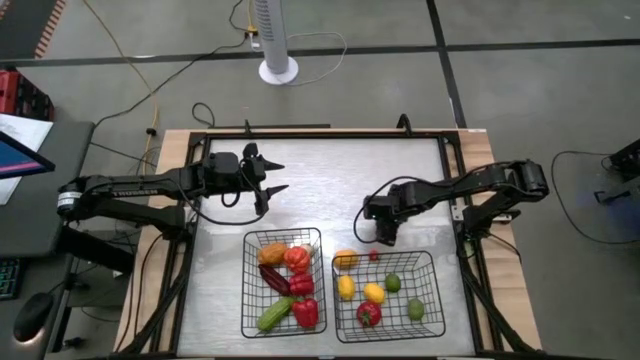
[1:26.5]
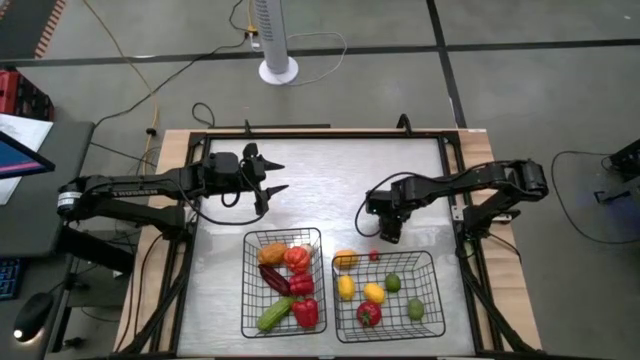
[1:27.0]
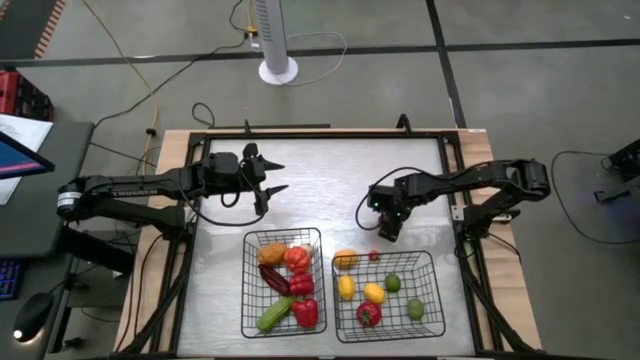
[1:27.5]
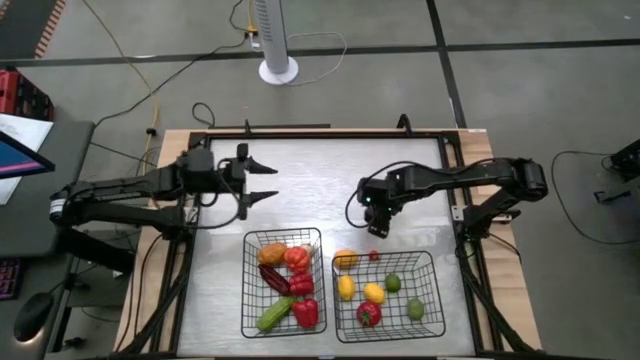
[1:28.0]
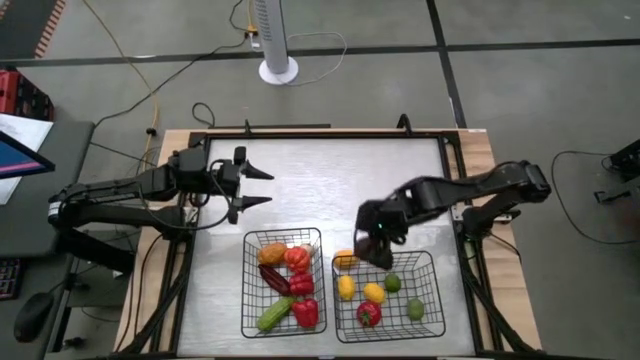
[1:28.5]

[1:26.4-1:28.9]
Task: Sort produce into baskets
Put the red apple into the right black wire basket

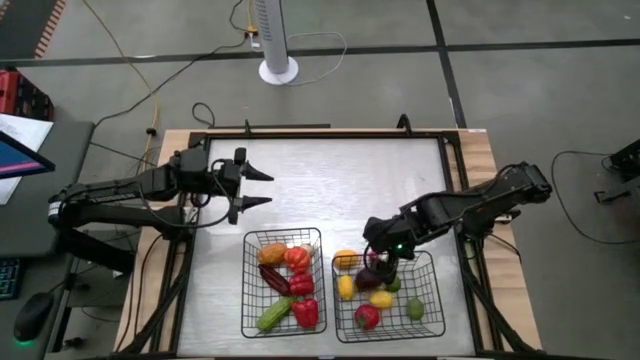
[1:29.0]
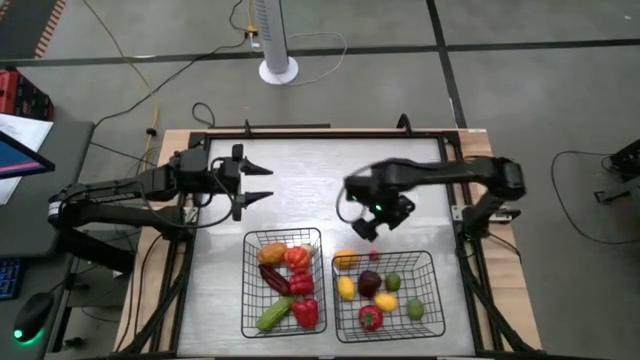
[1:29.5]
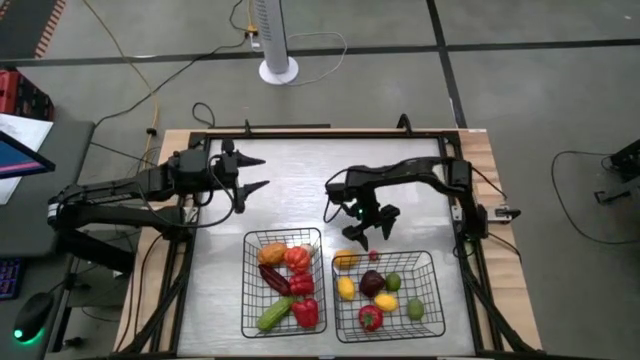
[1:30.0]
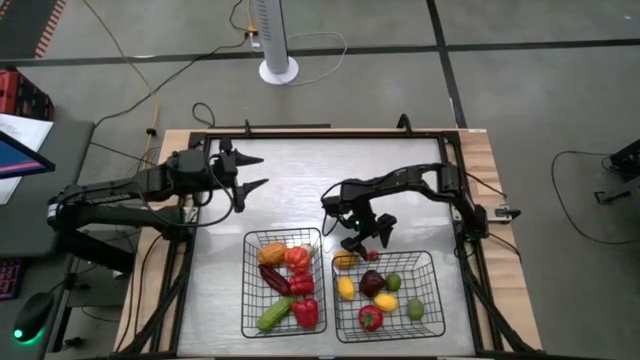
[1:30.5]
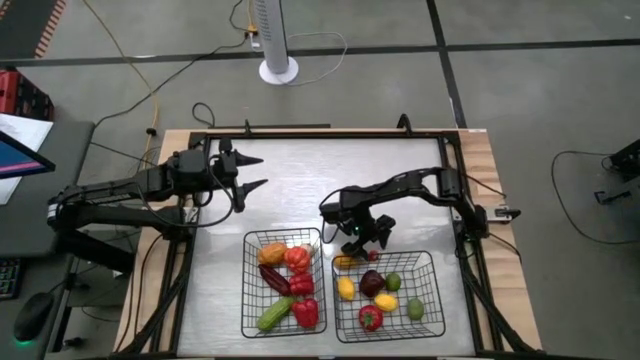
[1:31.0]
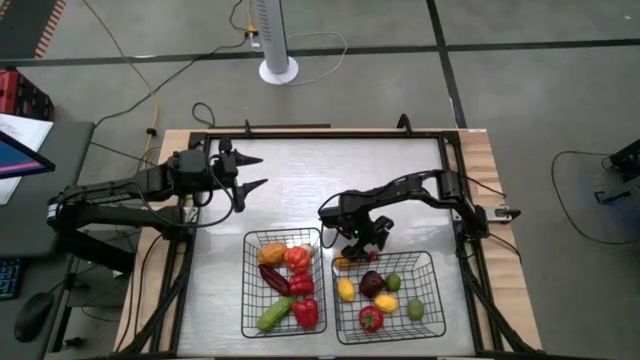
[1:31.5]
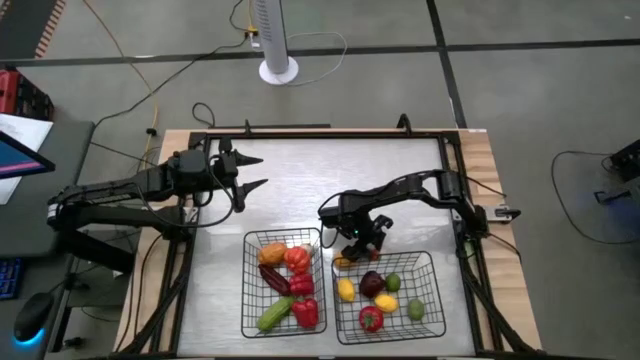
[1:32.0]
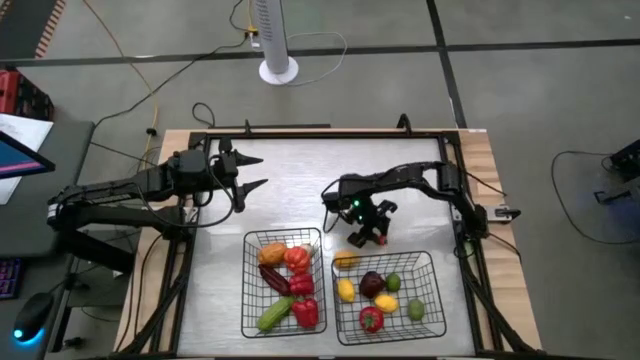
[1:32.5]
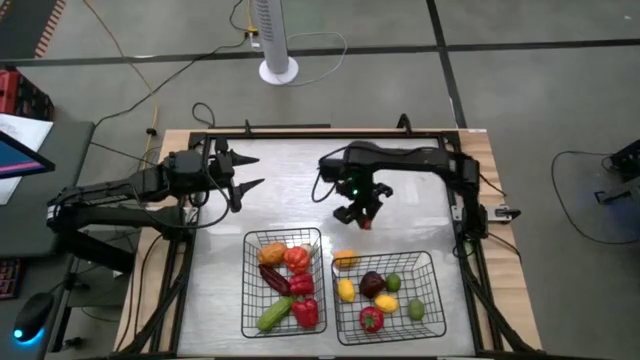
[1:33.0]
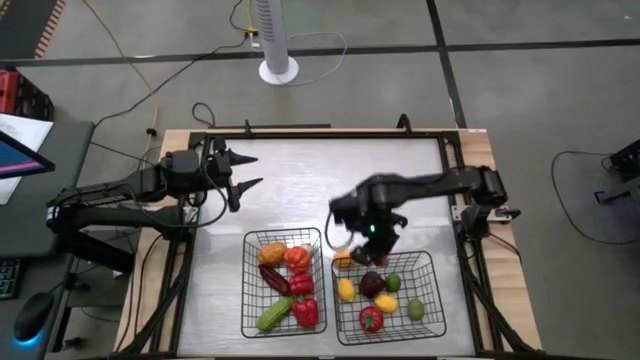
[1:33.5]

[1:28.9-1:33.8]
Put the orange tomato into the right black wire basket

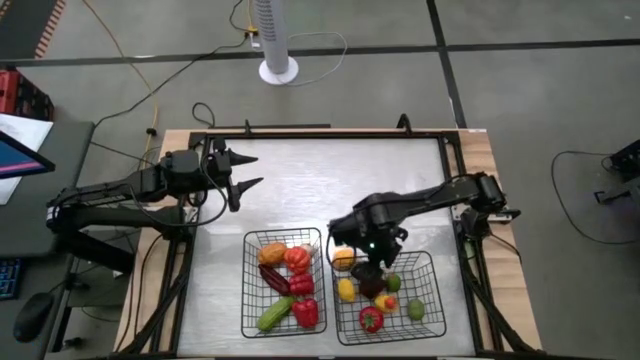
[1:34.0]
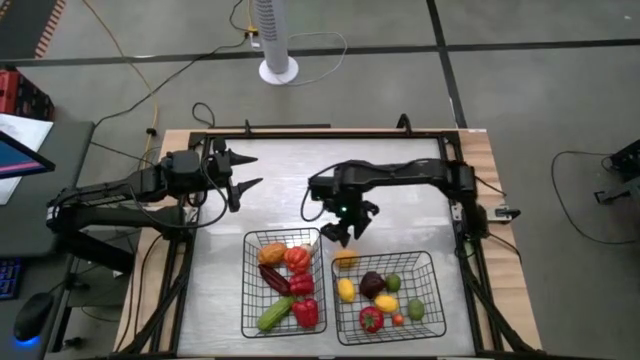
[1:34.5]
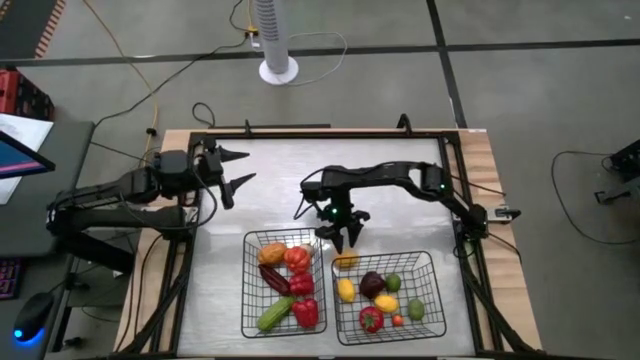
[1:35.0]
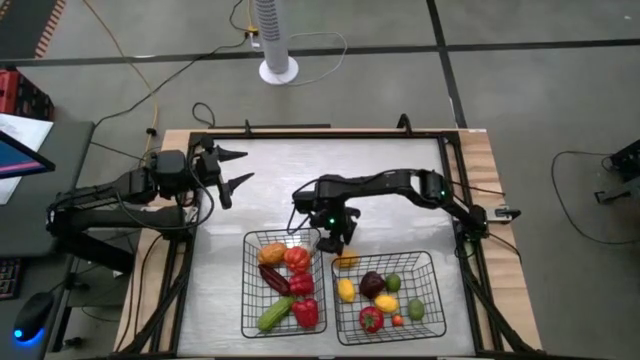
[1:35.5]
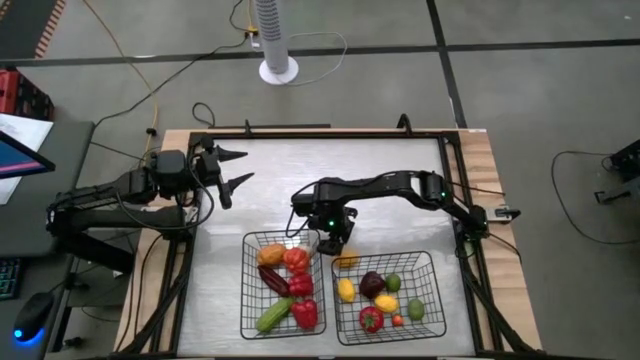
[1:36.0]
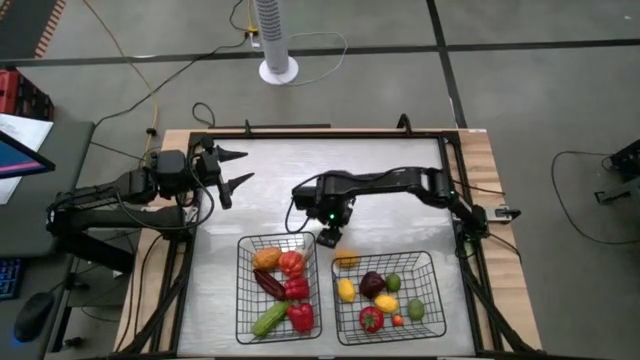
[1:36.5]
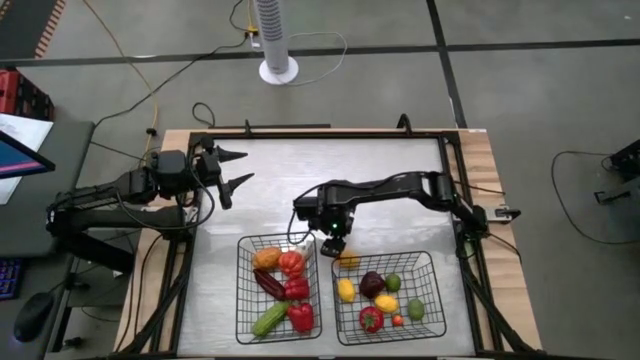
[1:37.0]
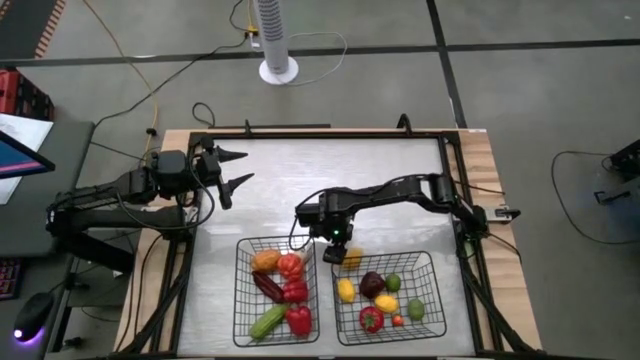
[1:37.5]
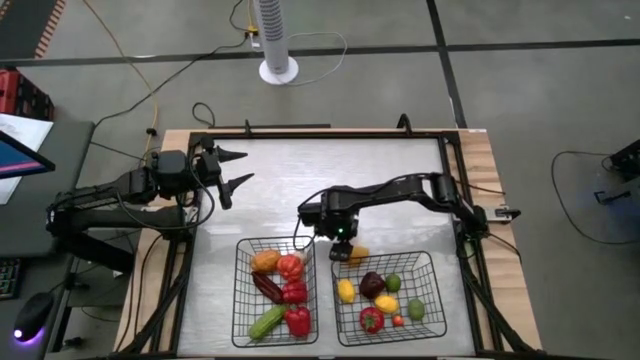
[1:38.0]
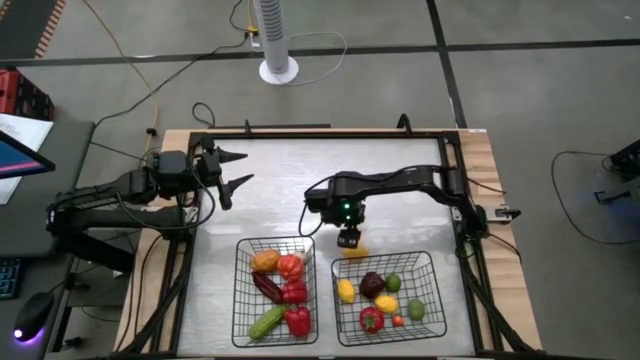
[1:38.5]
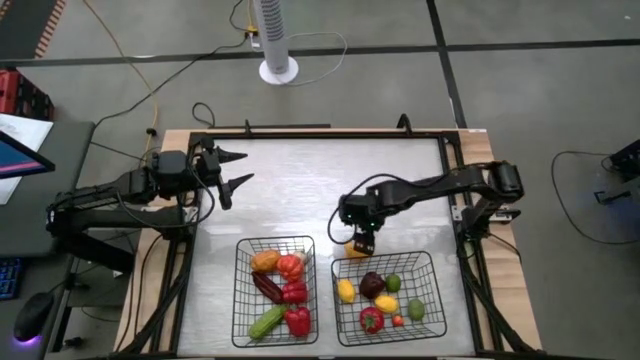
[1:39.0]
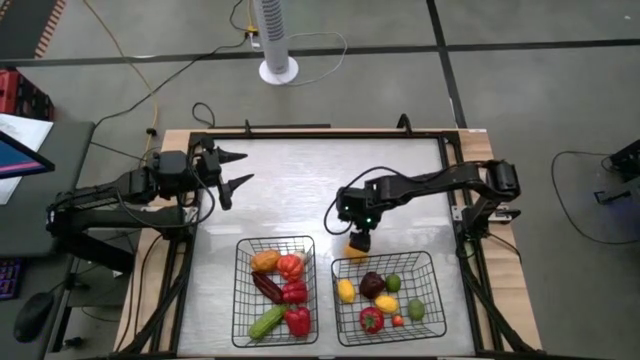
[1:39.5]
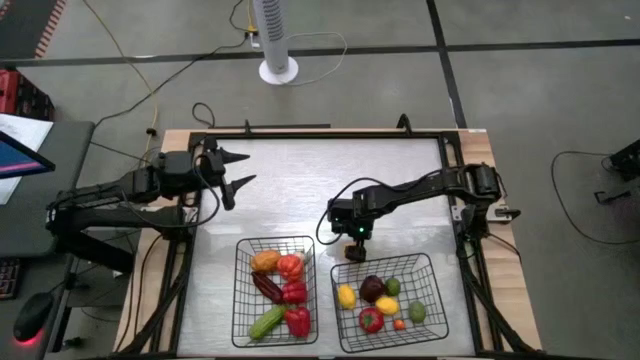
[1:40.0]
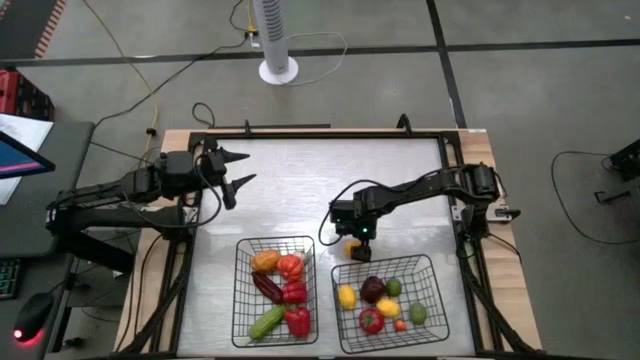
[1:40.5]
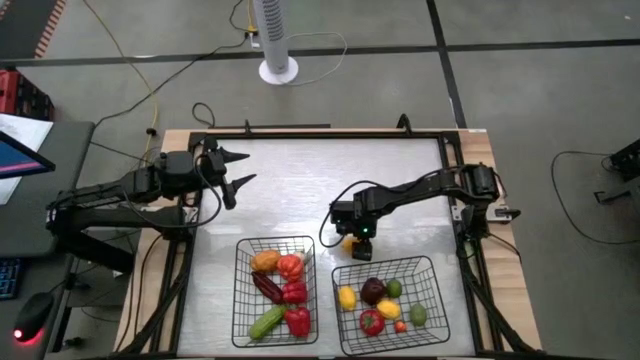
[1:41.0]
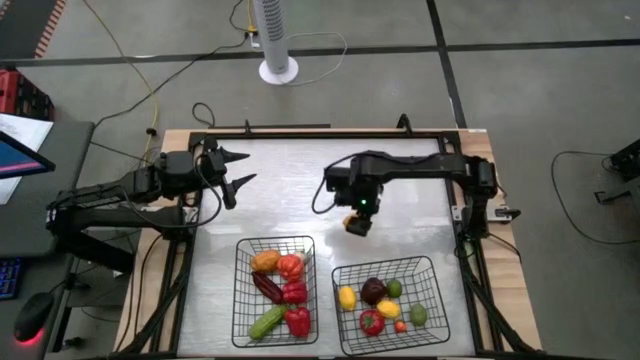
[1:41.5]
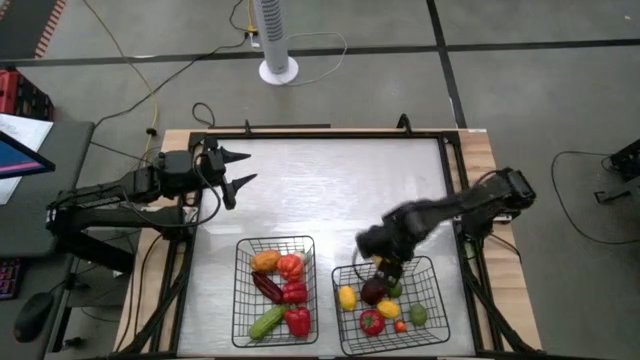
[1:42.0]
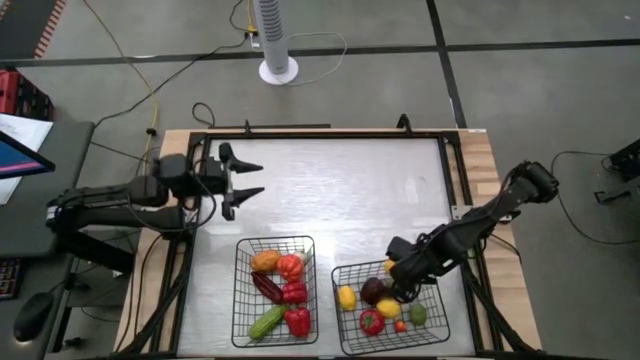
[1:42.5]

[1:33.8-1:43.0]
Put the yellow lemon into the right black wire basket

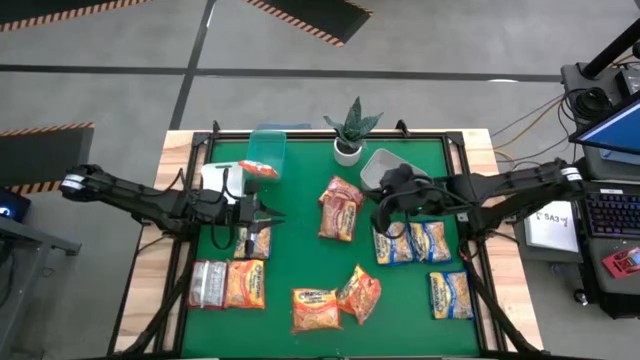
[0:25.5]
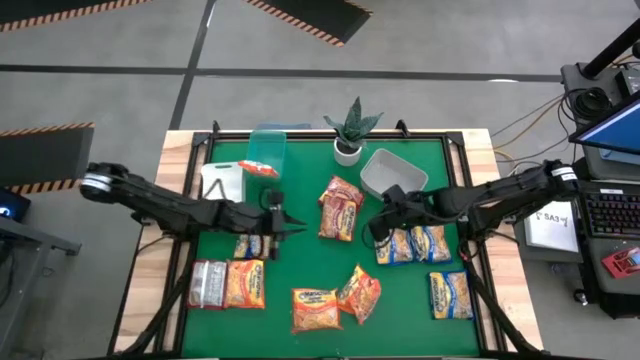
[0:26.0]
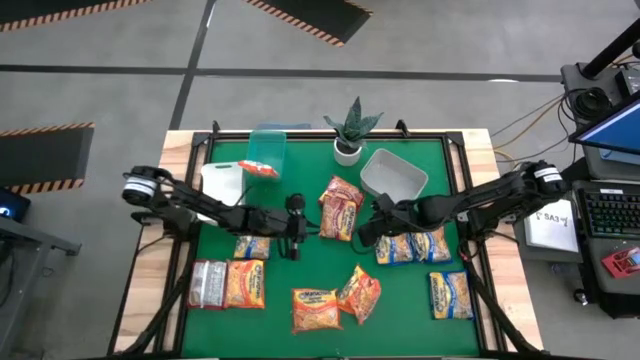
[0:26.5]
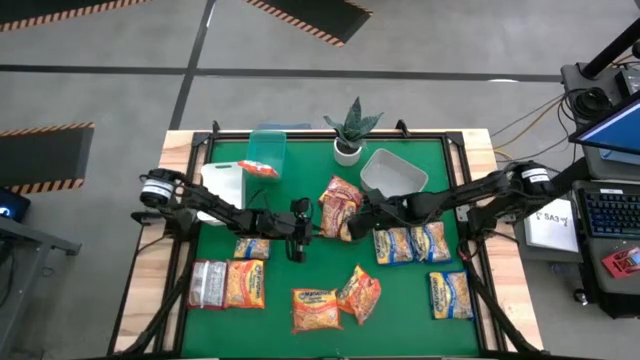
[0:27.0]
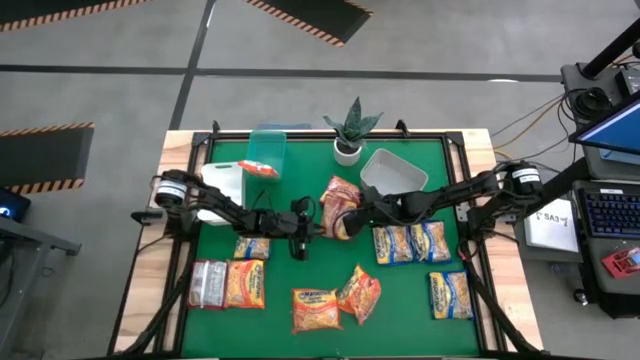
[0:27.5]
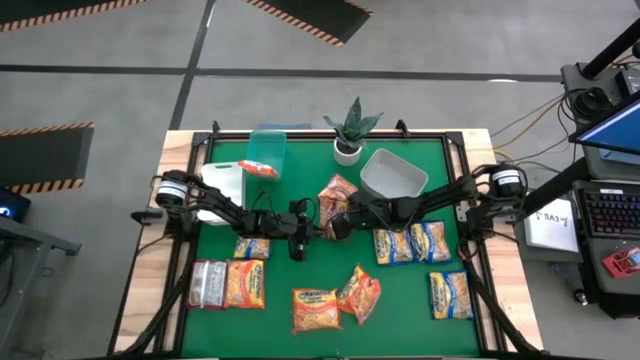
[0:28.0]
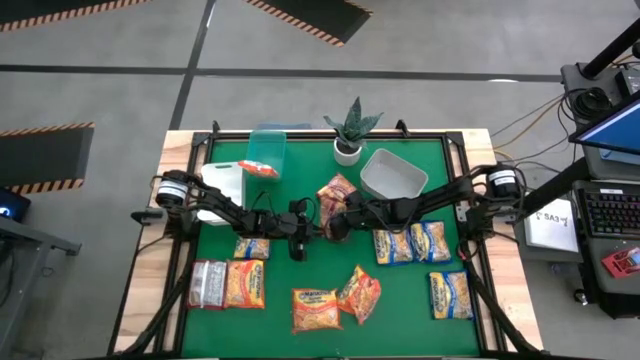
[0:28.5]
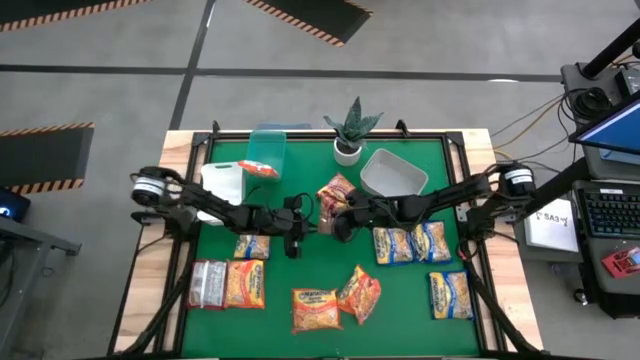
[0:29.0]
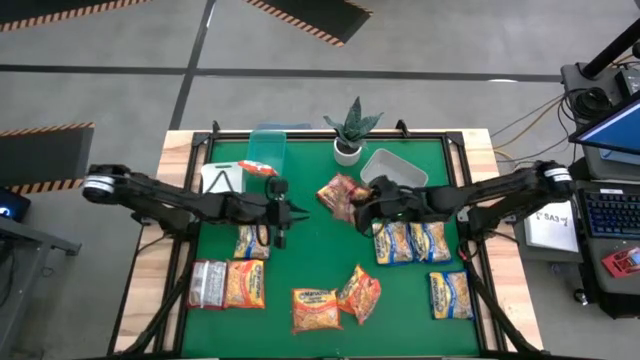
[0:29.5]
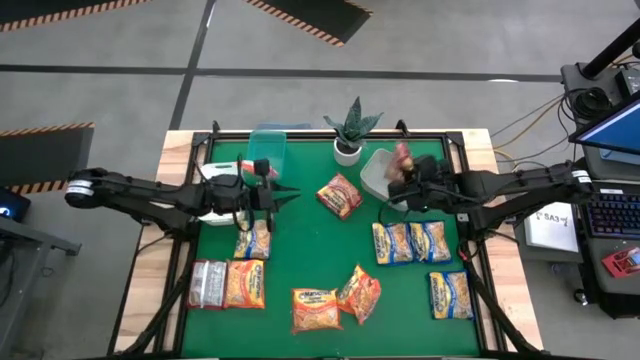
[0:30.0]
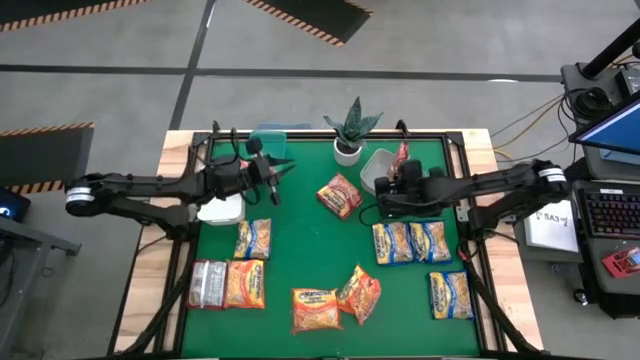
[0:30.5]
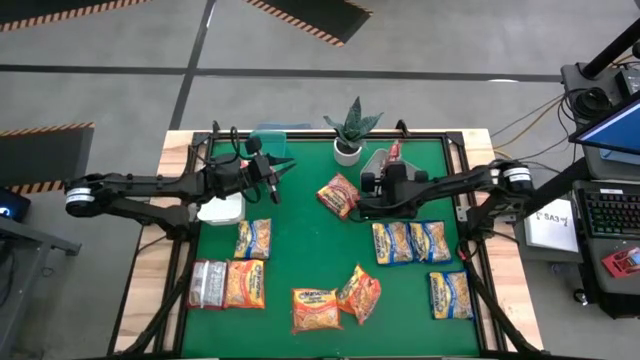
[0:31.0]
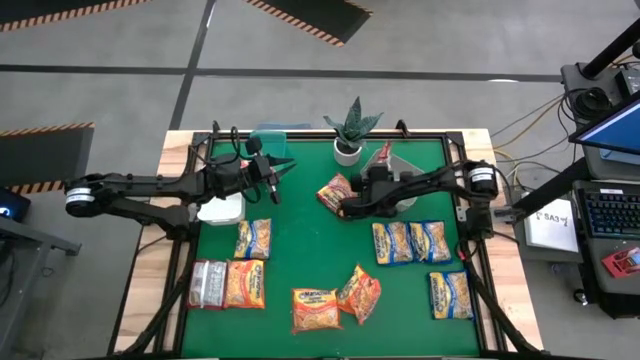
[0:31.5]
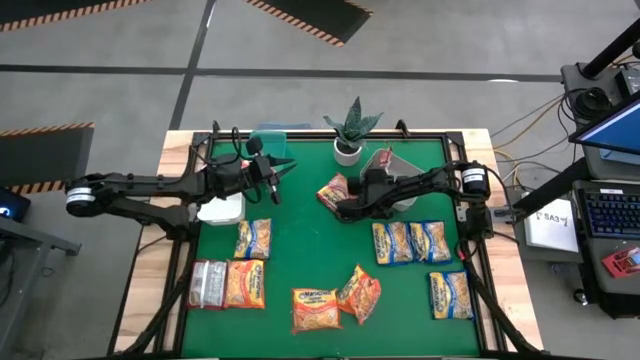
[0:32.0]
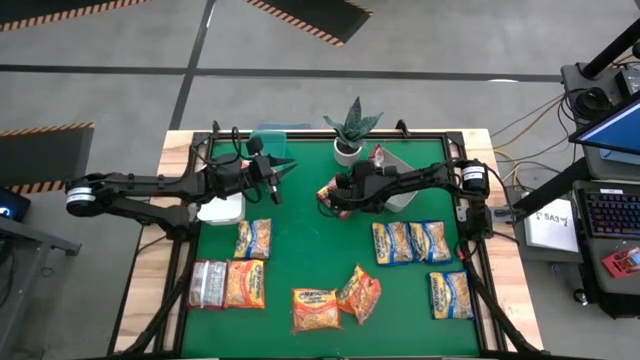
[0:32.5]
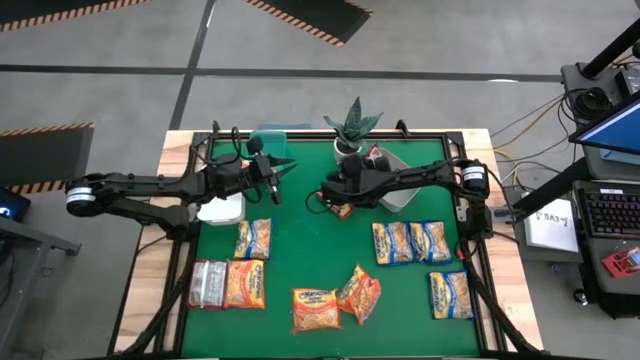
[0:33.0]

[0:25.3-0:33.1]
Task: Sort Maruchan noodles
Put the middle red noodle pack into the gray bin
